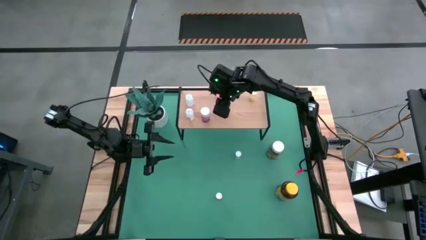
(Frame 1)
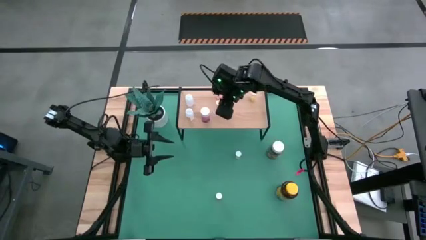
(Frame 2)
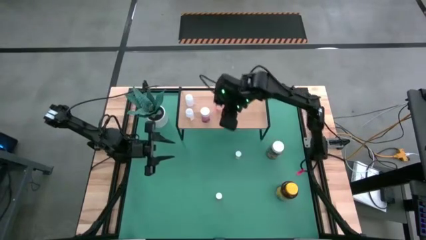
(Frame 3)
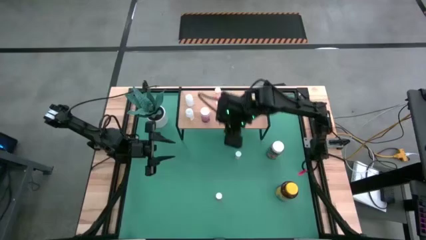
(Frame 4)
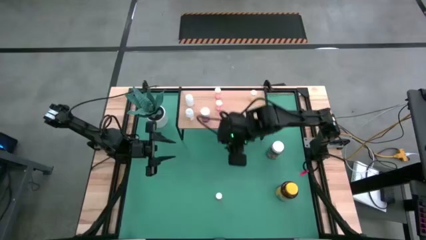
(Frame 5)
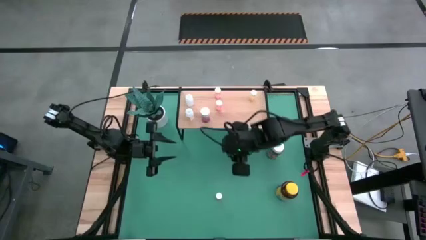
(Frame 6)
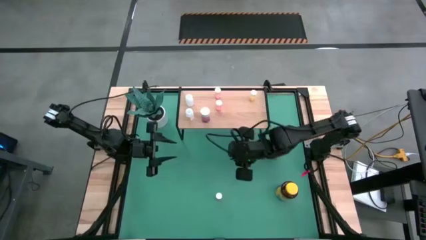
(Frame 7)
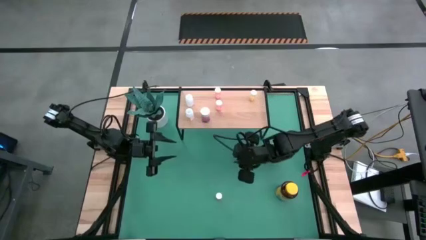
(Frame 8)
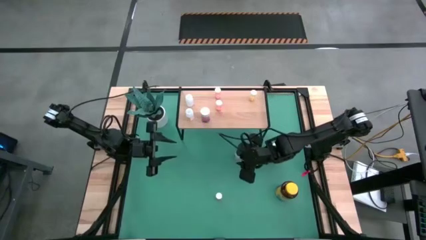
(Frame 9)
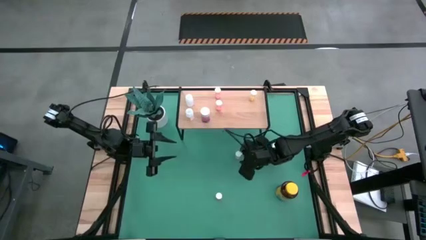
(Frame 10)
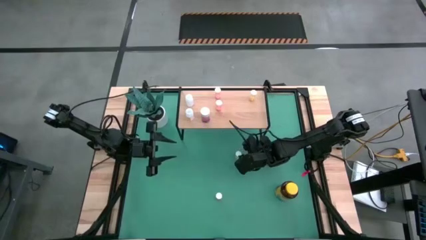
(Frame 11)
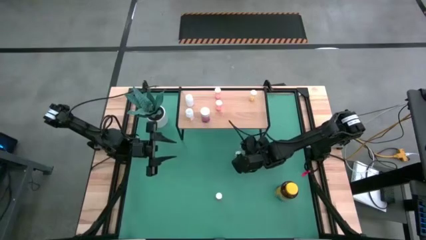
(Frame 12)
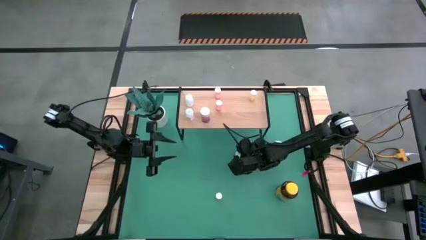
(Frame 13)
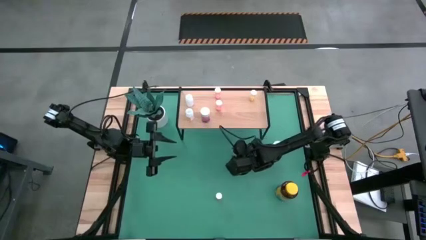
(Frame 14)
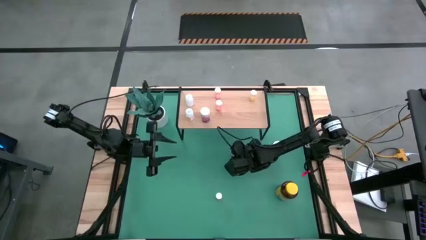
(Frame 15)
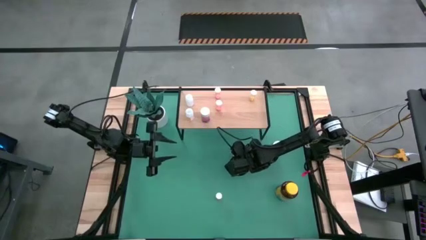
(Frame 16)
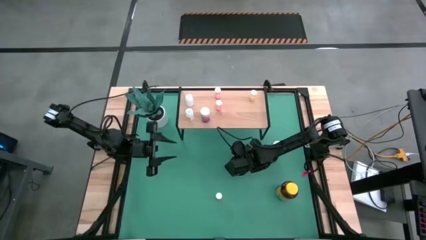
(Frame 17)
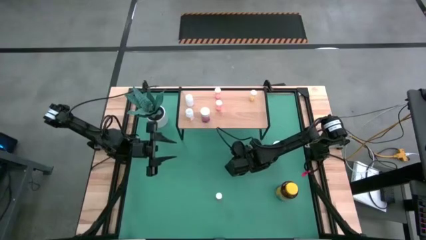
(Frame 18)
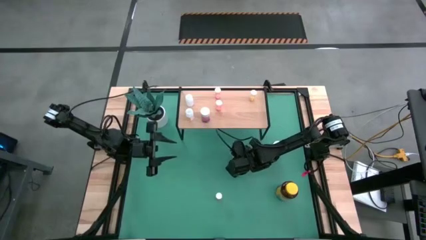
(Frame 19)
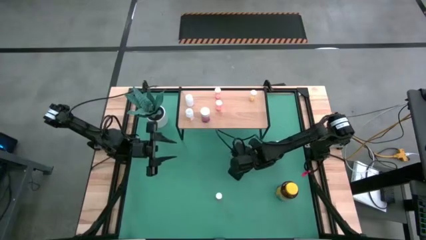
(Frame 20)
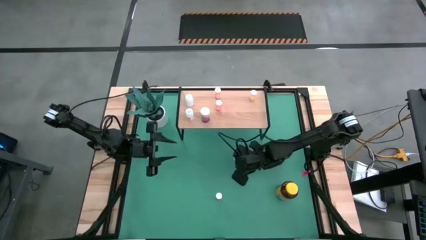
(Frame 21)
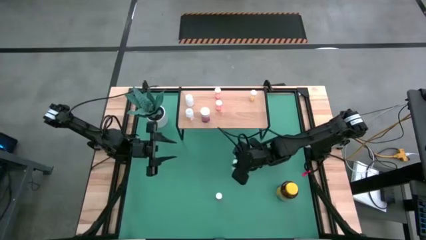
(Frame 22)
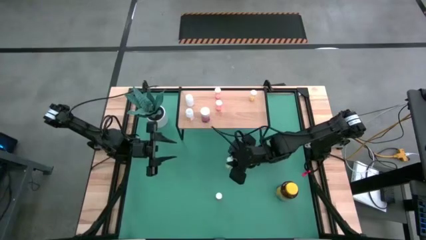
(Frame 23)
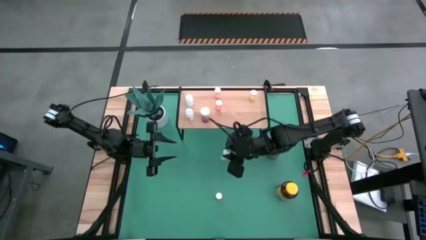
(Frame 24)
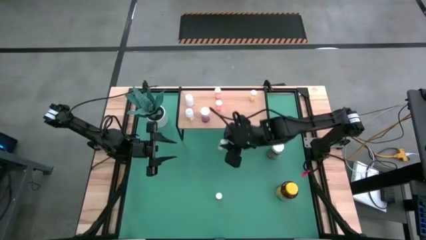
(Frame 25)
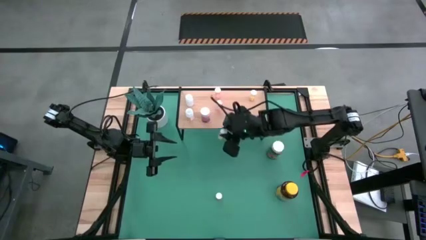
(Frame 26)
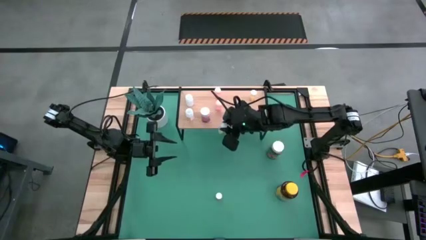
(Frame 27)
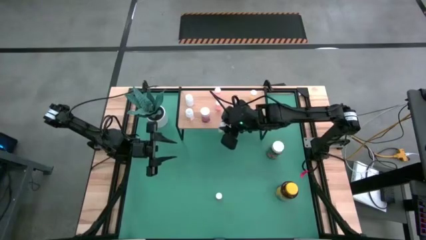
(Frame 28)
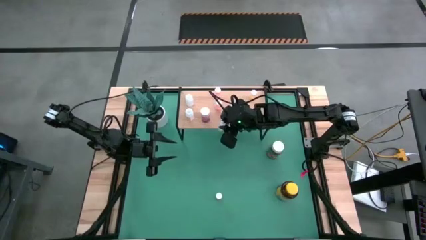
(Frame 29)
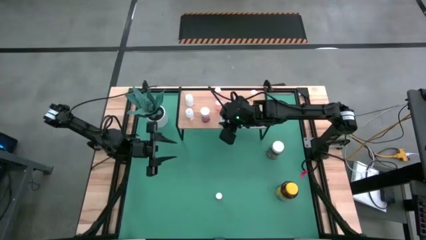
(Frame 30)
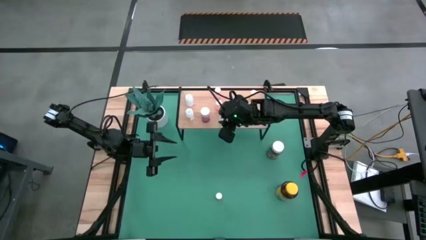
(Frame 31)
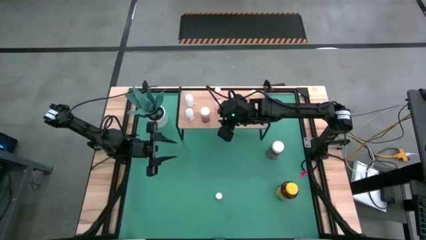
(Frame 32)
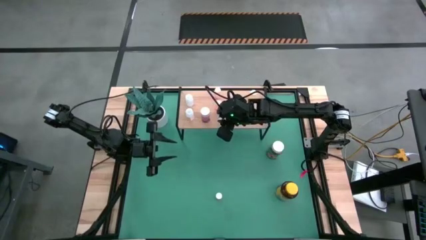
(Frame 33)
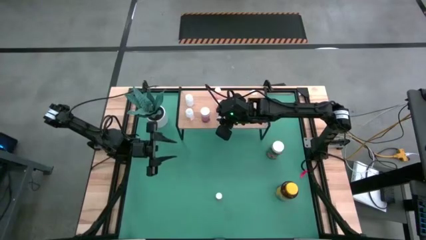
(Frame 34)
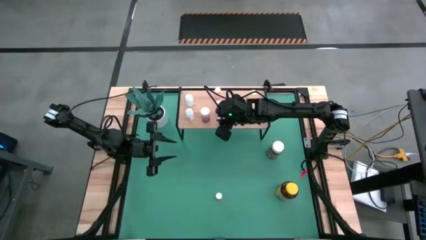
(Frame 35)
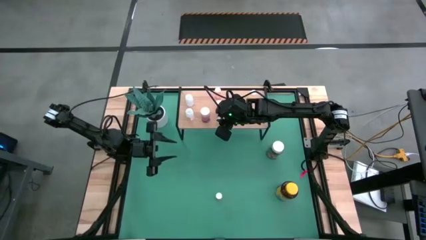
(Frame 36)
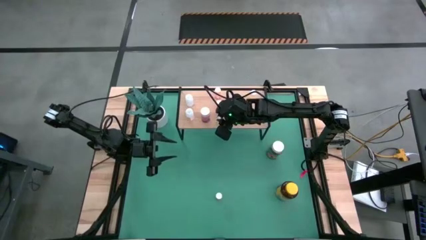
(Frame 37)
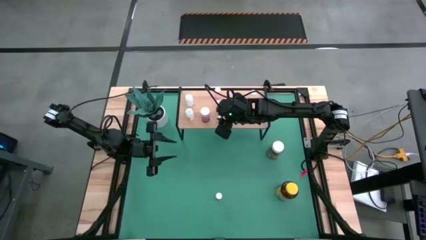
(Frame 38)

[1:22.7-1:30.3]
Task: Pick and place medicine bottles onto shelf by color
Put the yellow pill bottle on the shelf

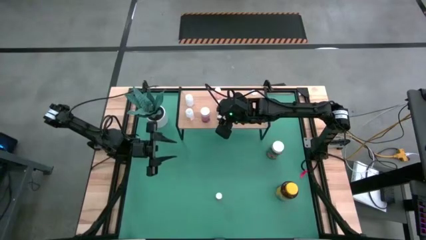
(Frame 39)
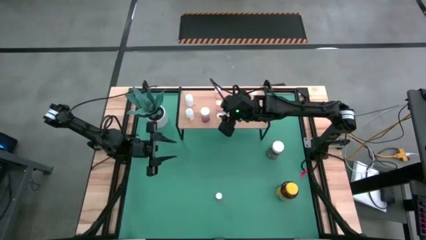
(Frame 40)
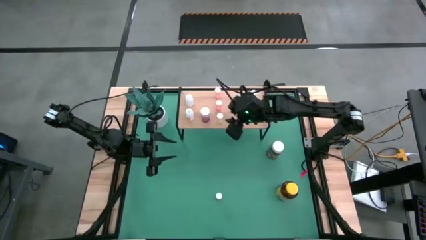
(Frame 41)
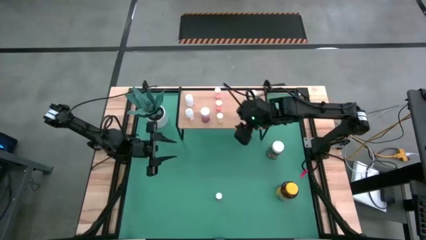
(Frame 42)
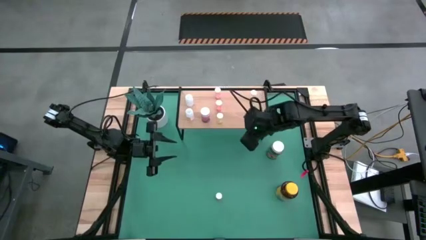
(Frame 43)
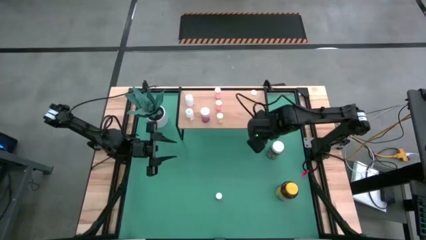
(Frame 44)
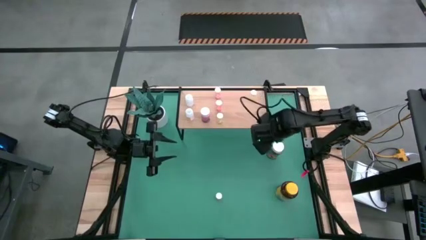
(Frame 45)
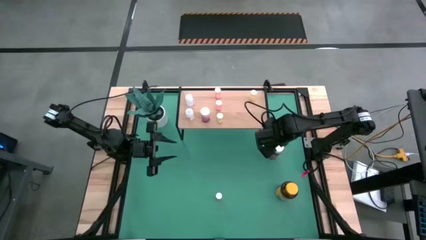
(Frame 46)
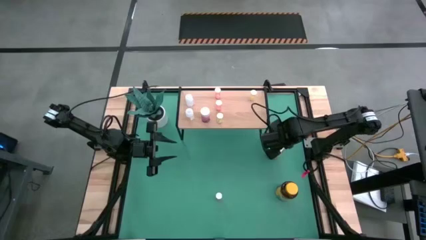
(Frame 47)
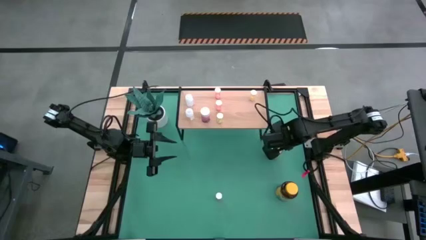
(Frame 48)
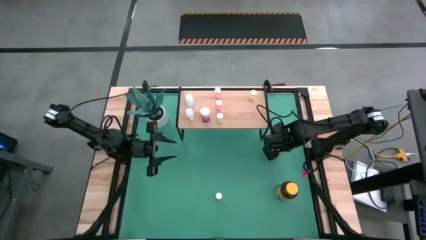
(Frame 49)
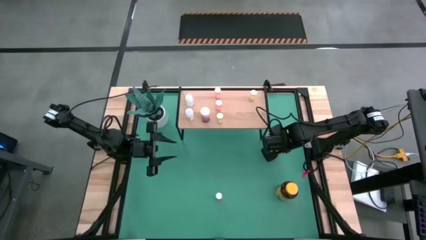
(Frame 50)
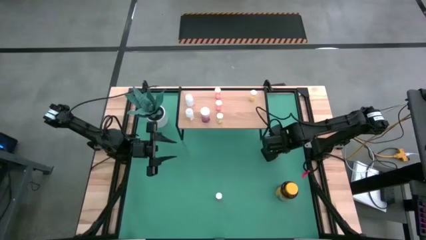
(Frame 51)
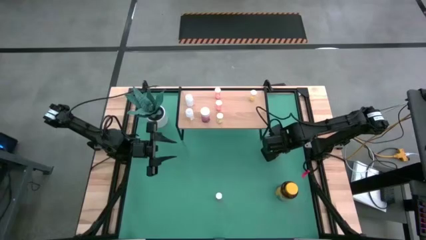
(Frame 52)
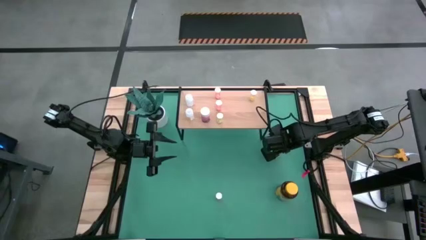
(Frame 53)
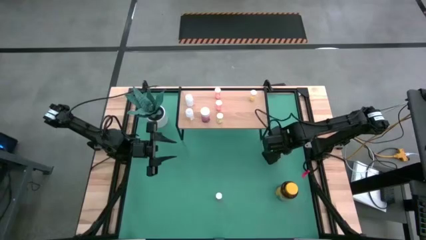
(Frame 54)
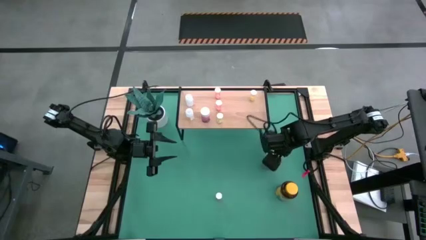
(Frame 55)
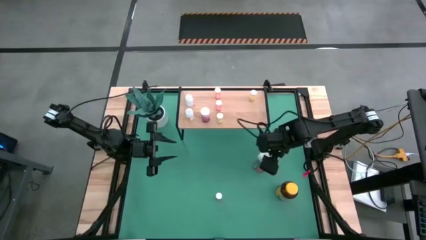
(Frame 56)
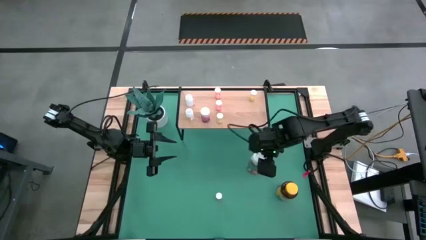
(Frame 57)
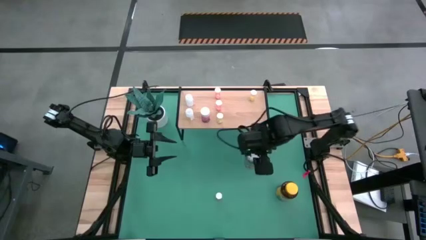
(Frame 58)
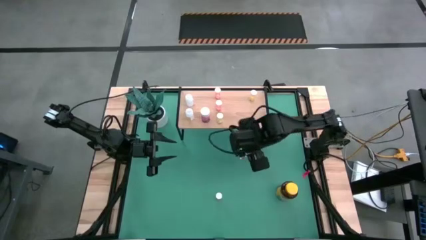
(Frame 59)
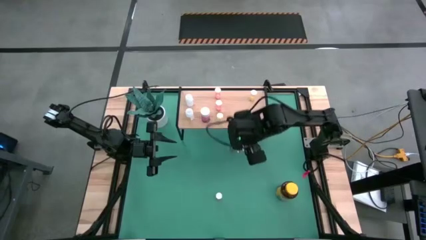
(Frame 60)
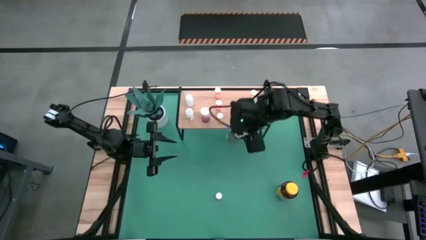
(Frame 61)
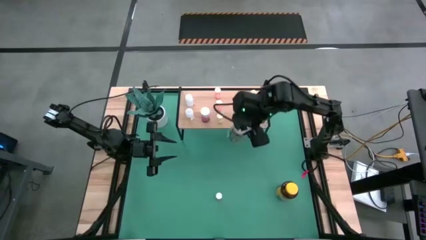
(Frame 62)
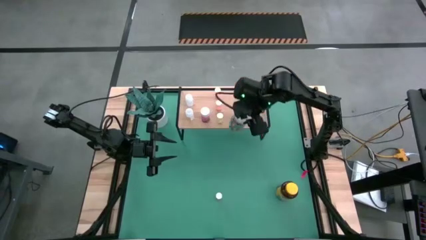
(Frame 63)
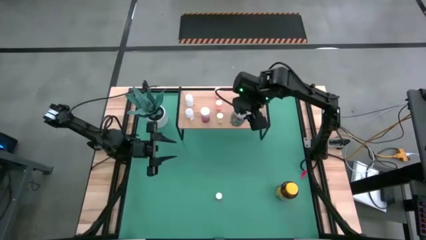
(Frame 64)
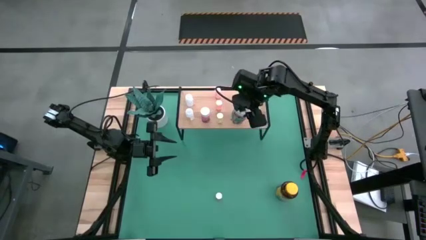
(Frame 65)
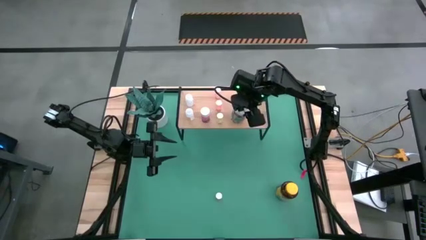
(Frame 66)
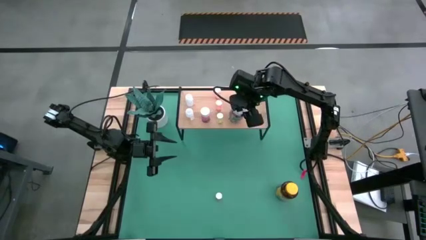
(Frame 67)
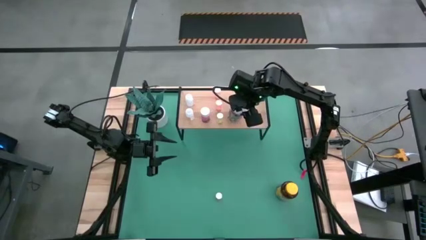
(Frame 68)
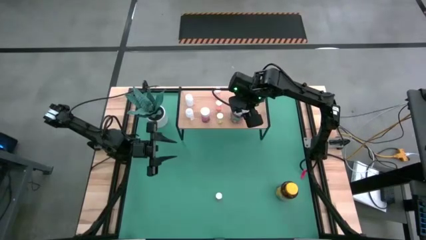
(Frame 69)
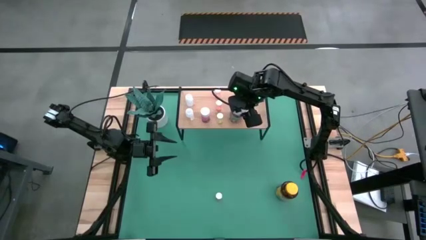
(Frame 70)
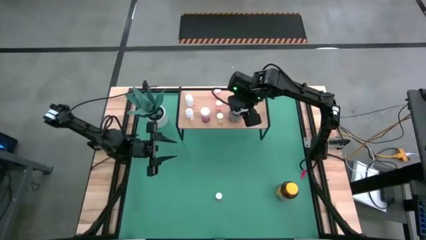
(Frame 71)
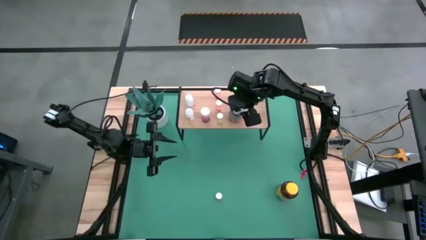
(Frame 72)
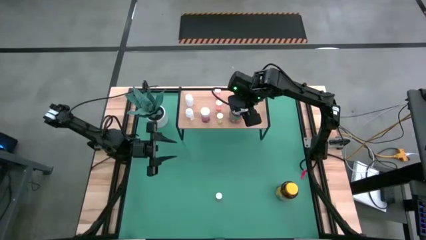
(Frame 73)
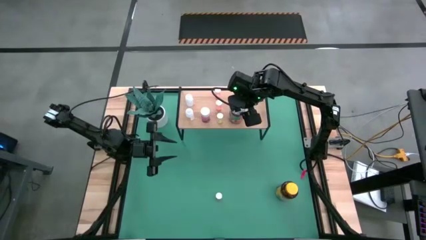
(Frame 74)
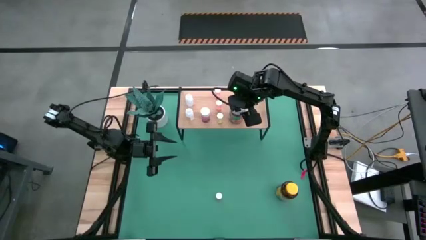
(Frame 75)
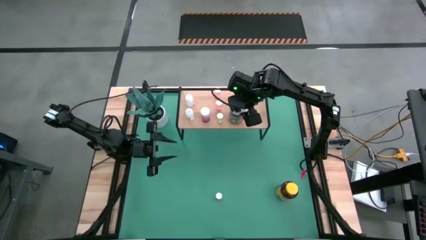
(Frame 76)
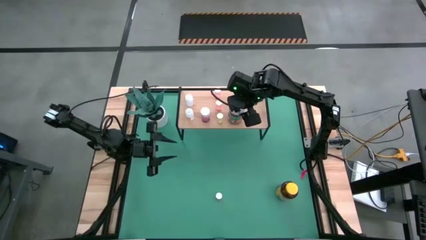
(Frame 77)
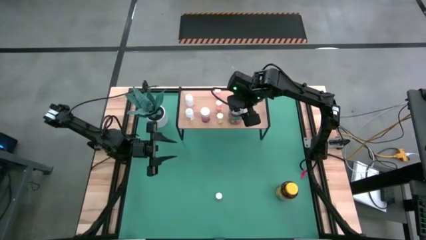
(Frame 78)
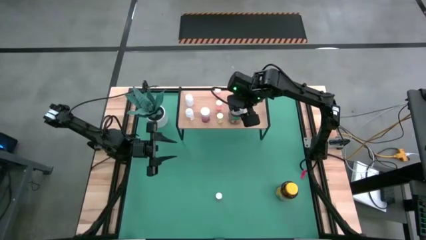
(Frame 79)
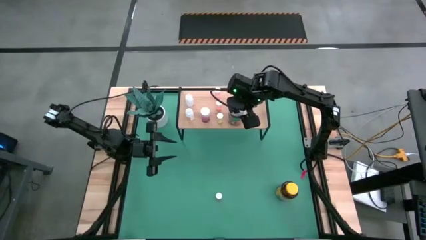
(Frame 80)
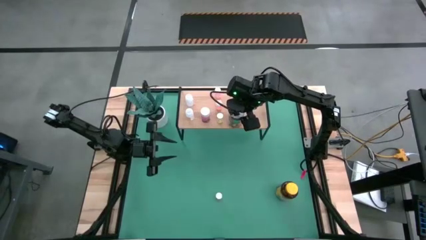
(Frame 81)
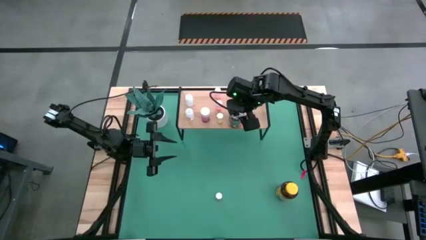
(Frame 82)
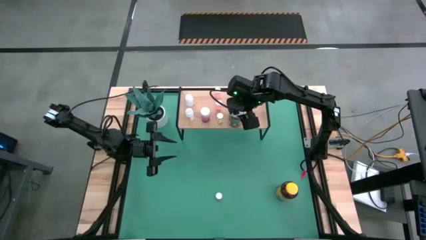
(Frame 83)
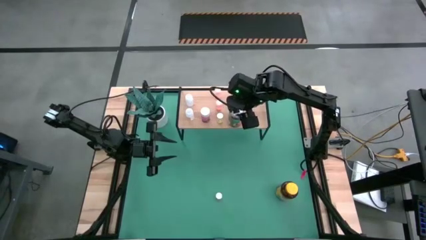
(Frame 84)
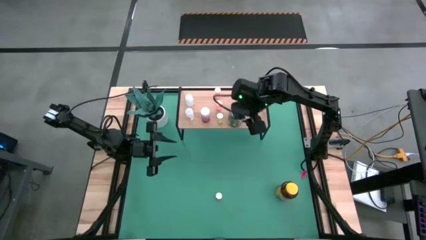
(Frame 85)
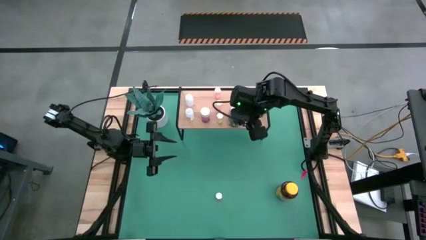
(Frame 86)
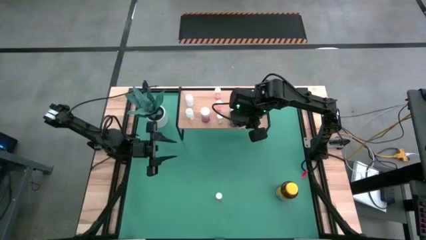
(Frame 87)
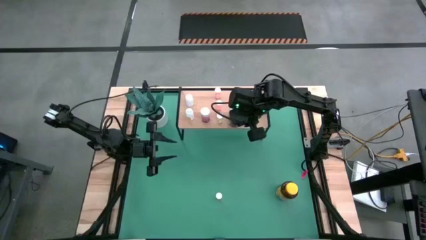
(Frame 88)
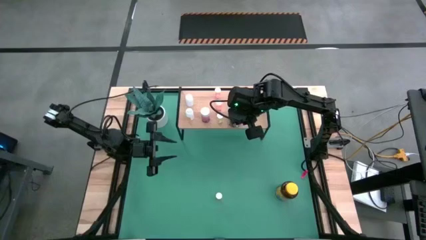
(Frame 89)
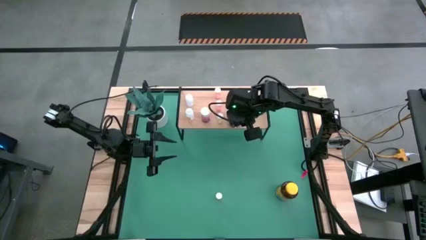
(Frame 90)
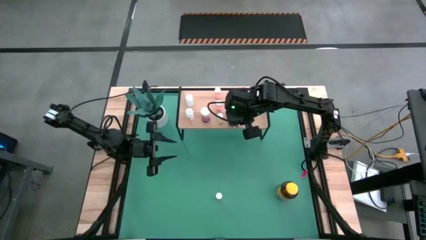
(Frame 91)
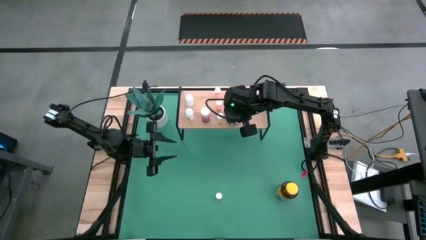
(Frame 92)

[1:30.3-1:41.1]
Put the green pill bottle on the shelf
